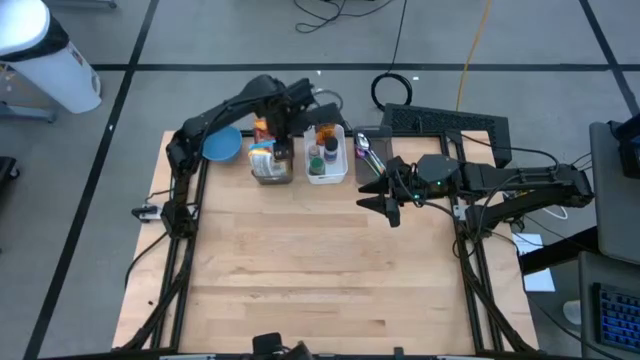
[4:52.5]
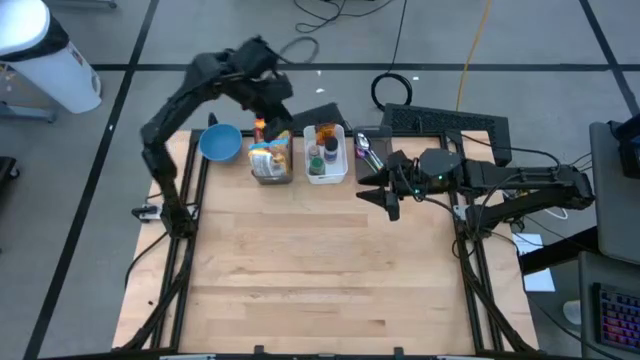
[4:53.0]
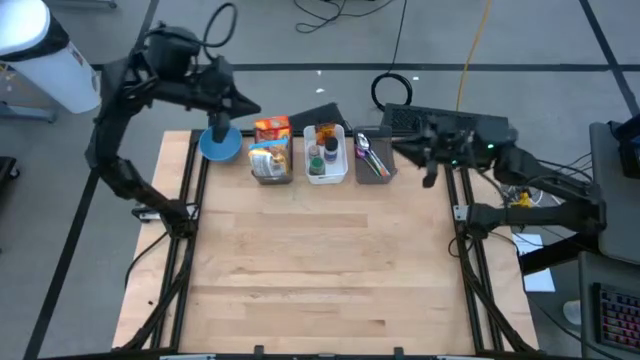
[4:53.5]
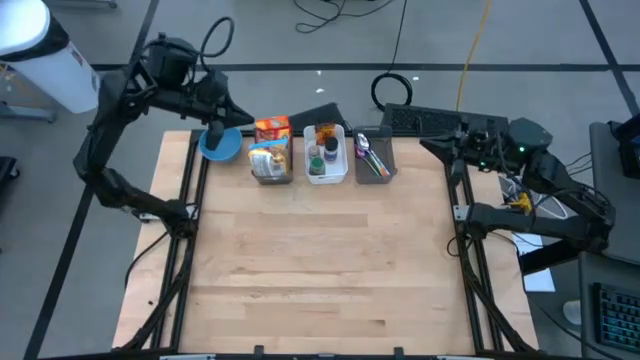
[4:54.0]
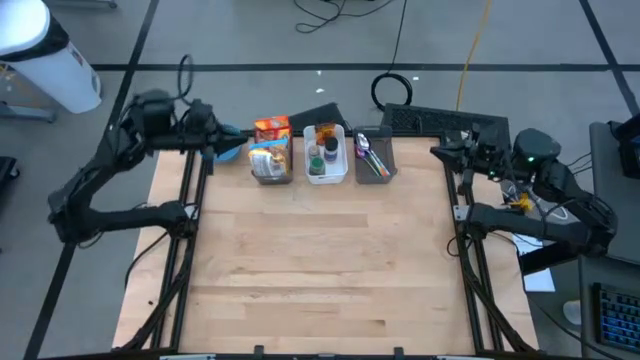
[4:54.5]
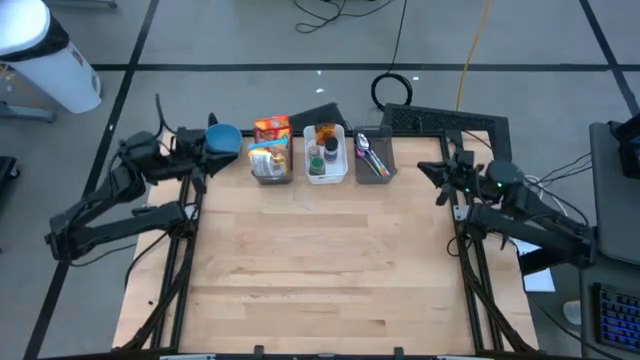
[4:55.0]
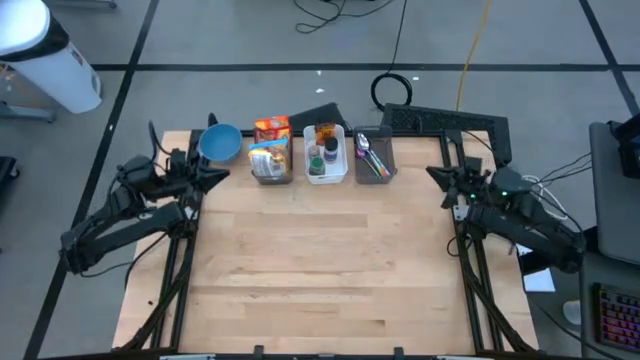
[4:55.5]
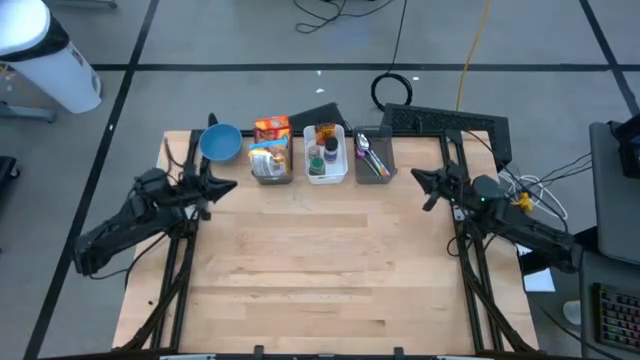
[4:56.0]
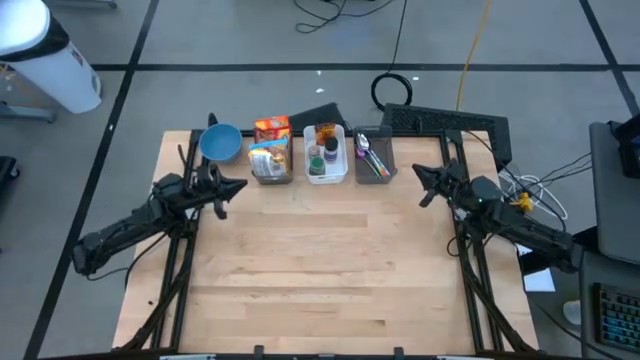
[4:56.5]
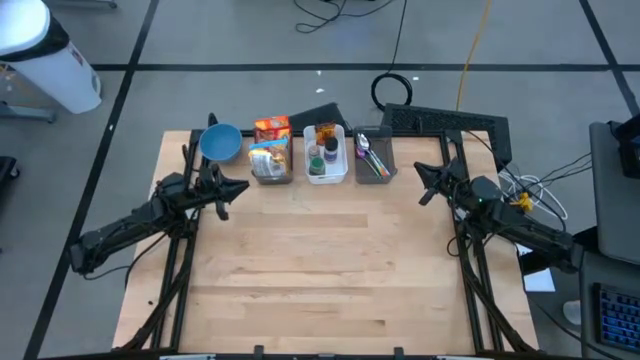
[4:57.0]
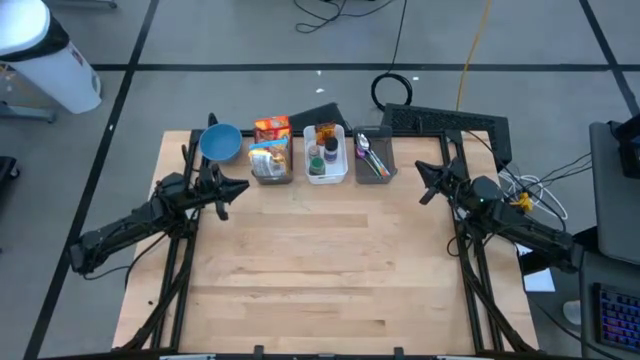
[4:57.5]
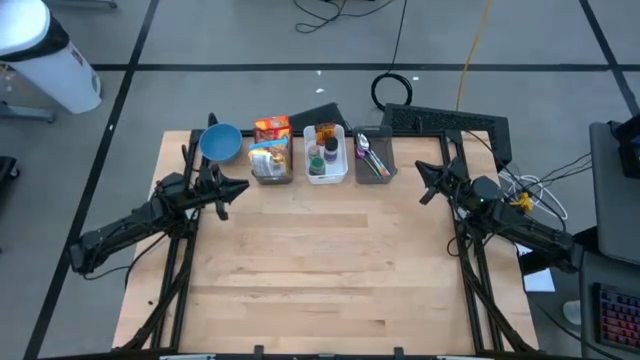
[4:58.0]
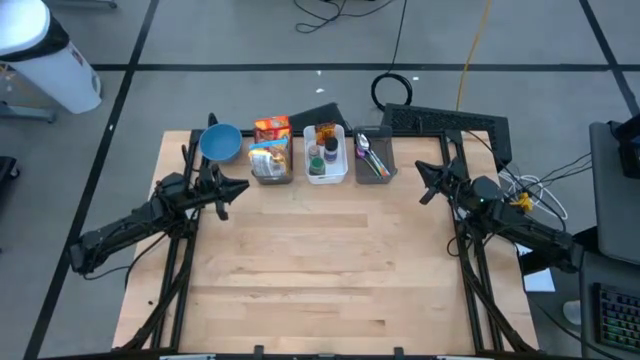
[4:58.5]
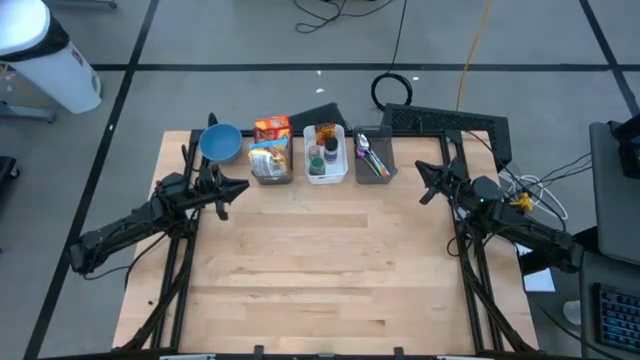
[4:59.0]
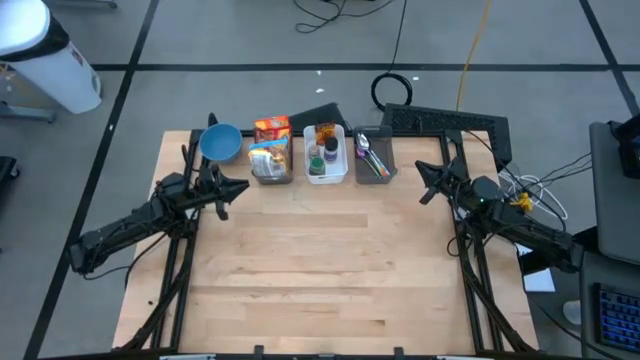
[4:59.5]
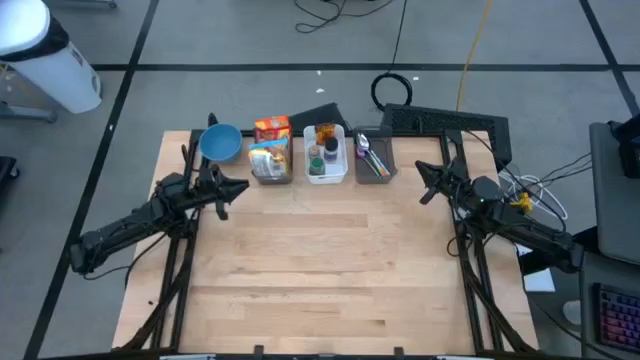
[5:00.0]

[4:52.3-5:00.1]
Task: Pick & Place Food Item
Return to Home Position

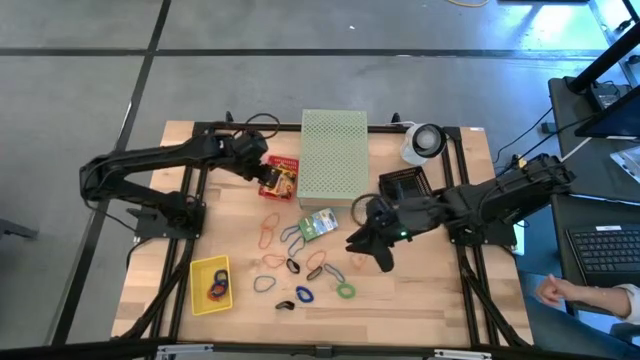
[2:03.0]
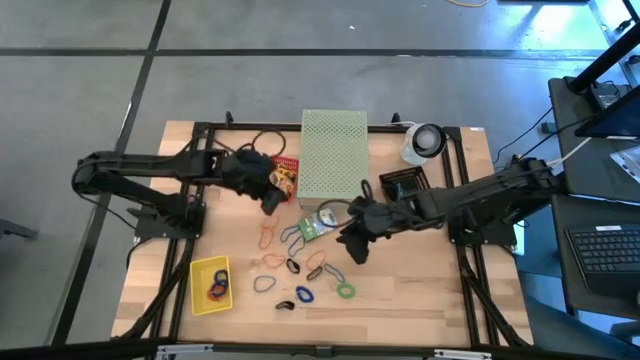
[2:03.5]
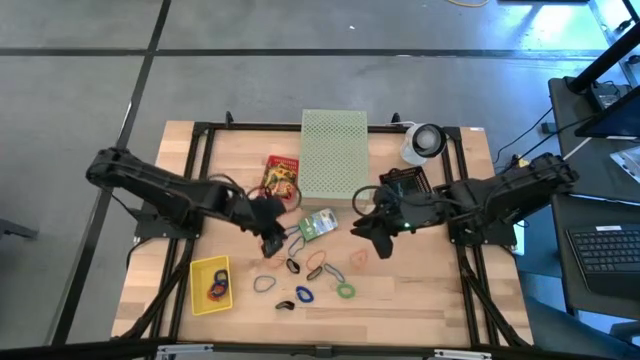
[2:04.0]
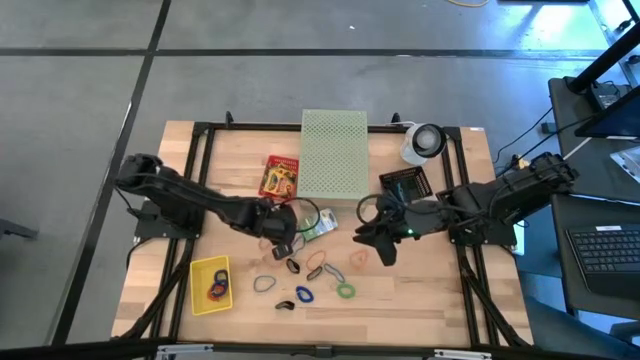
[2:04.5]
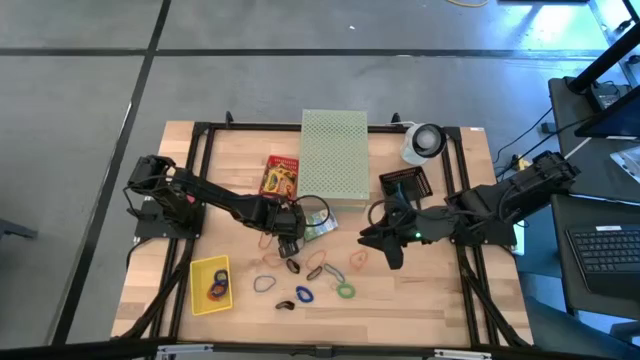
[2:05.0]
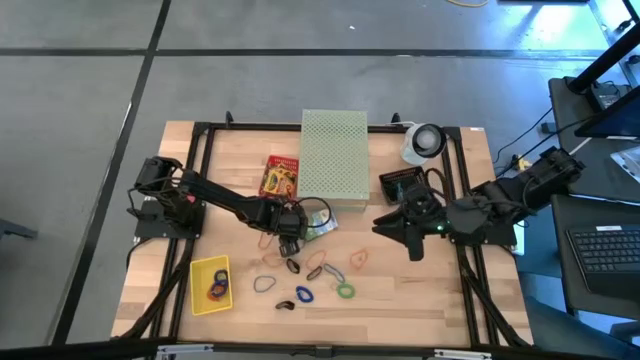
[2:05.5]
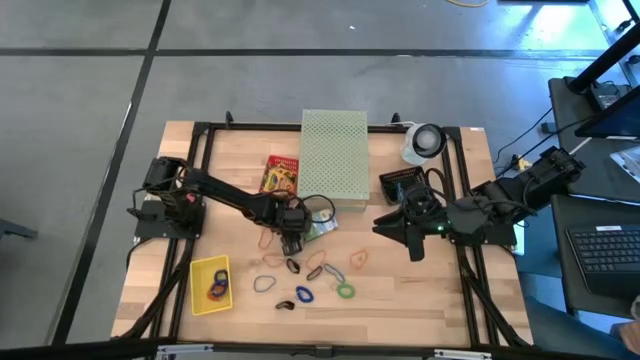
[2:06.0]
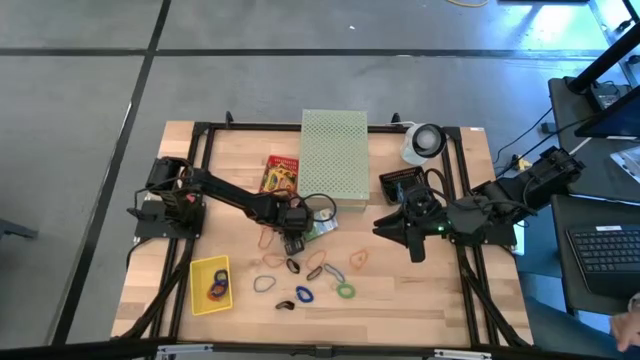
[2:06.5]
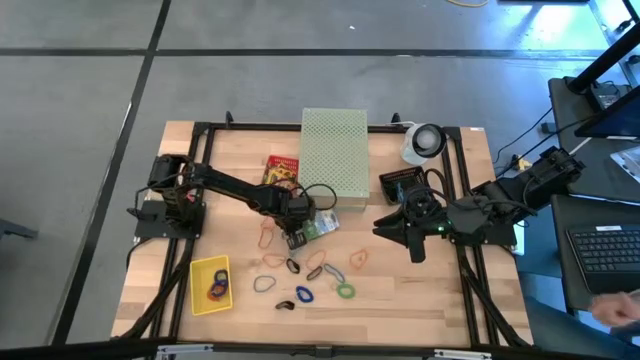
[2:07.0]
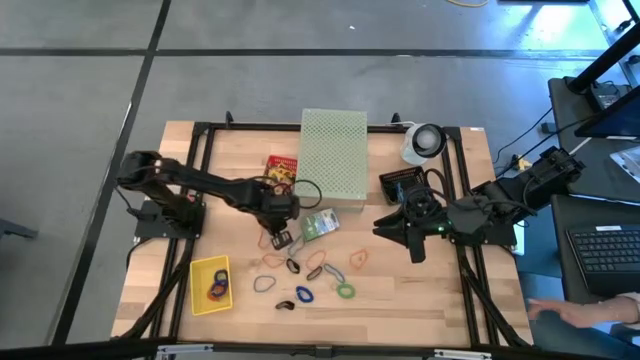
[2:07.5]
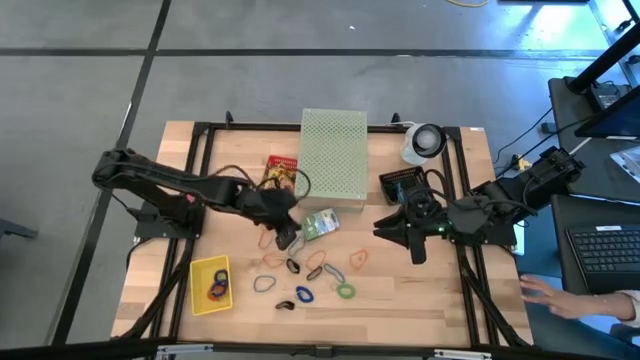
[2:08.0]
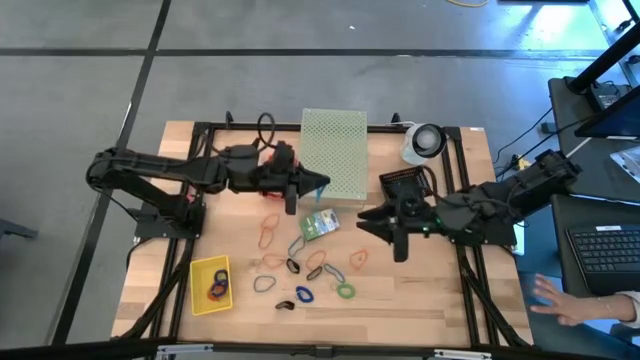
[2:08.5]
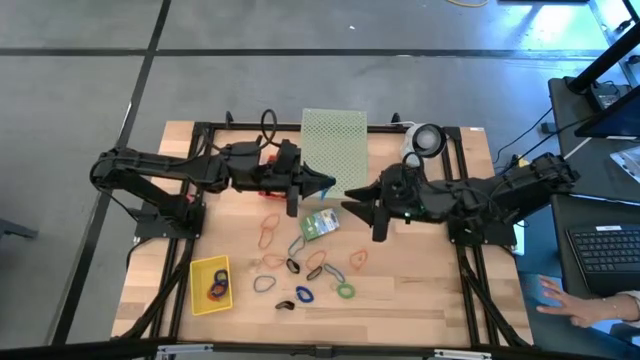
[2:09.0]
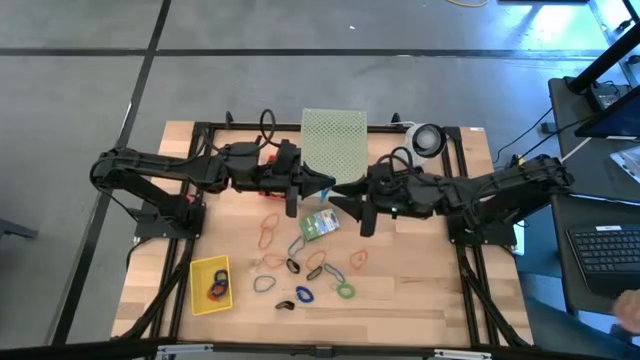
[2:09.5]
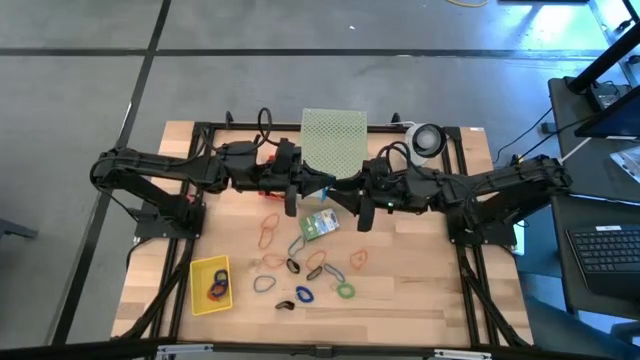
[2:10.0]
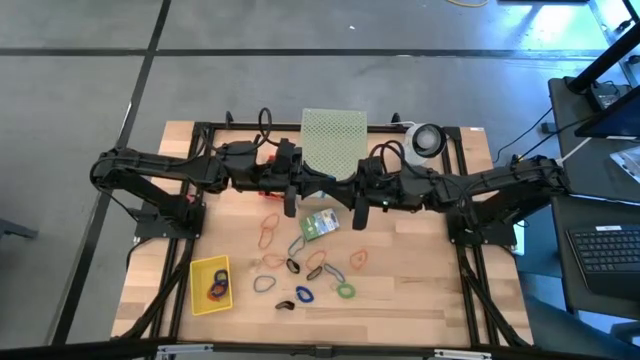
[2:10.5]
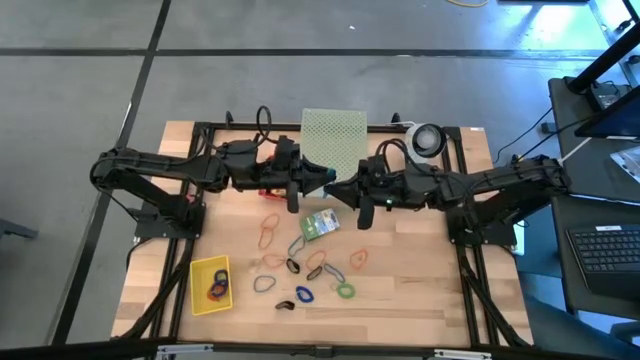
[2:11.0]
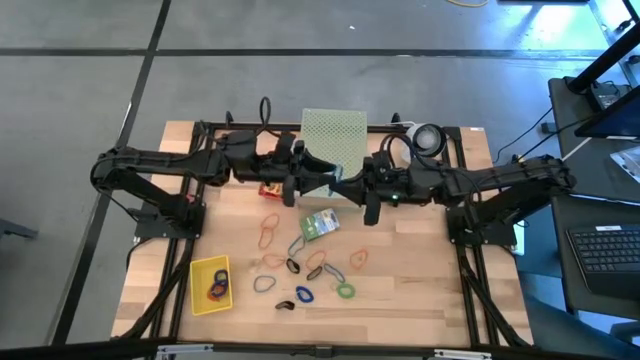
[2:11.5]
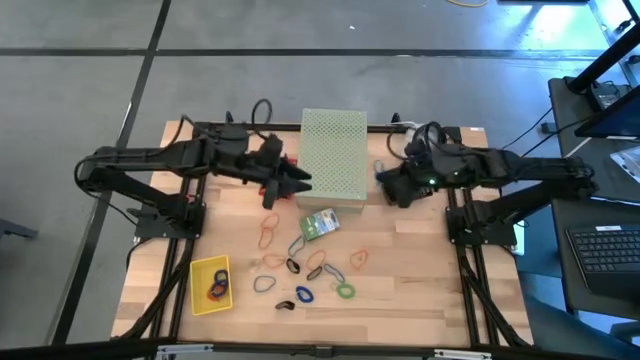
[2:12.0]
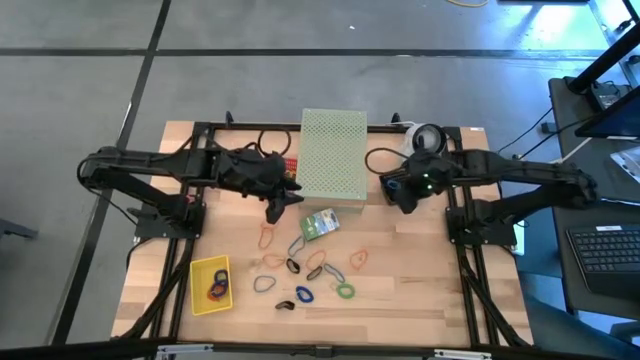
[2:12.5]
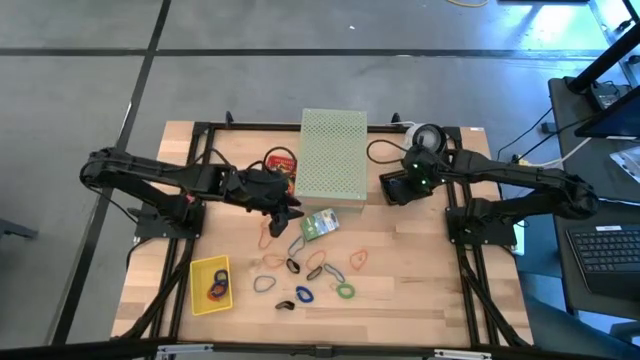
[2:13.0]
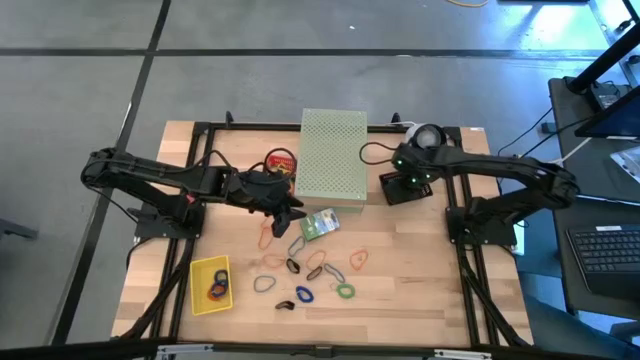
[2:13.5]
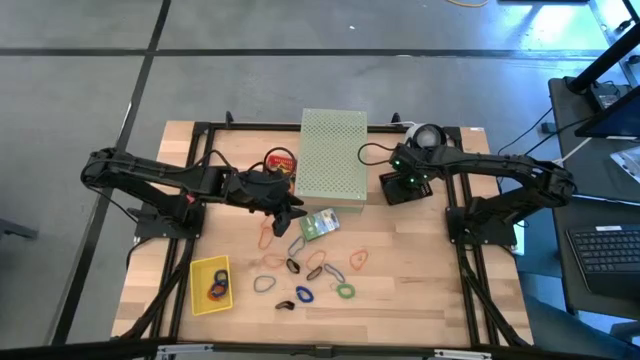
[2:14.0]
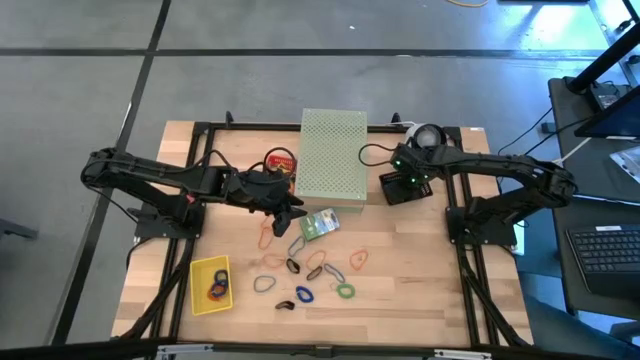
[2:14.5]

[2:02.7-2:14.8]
Task: Pick & Place Office Desk Supplies
Put the blue rubber band into the black bin
